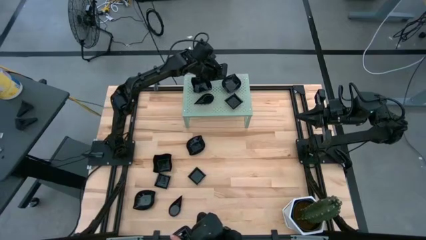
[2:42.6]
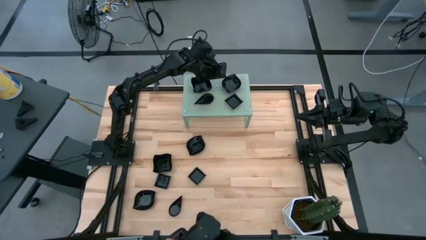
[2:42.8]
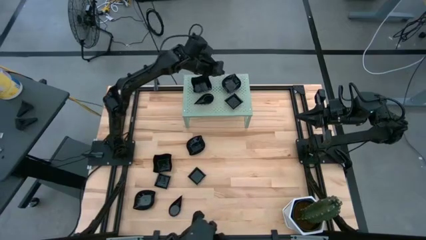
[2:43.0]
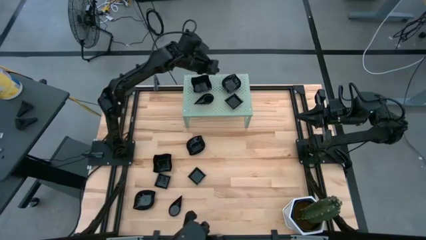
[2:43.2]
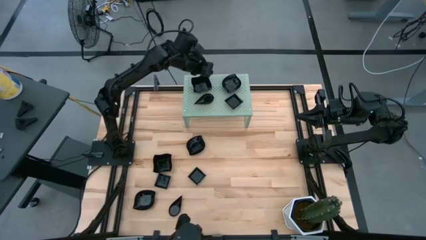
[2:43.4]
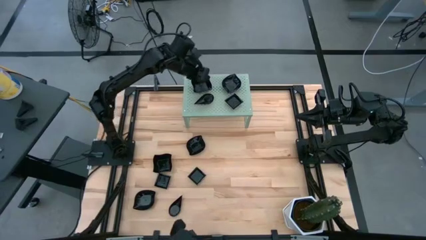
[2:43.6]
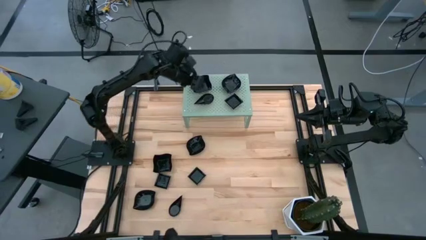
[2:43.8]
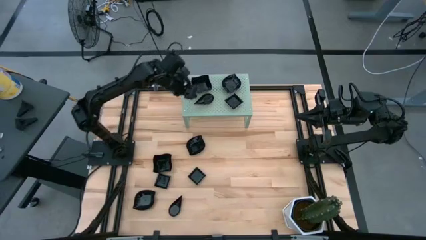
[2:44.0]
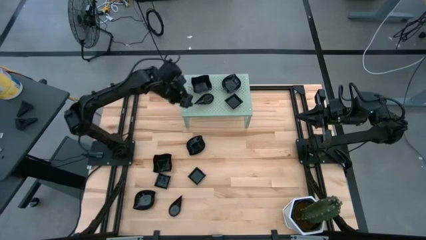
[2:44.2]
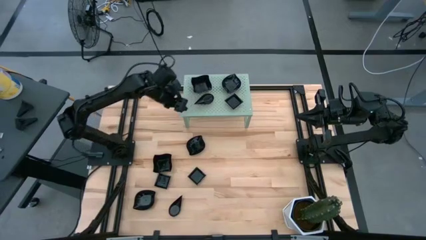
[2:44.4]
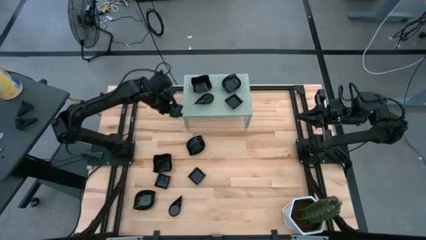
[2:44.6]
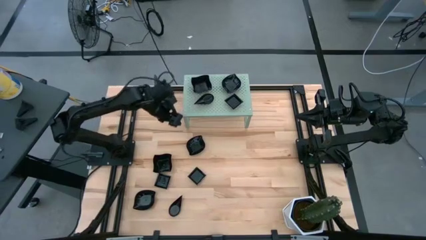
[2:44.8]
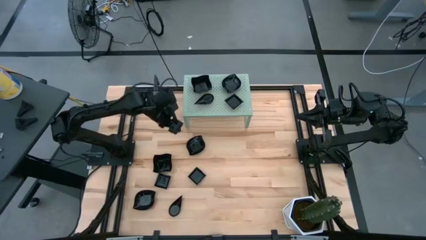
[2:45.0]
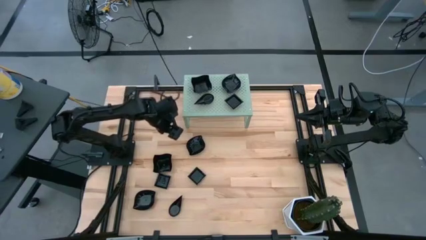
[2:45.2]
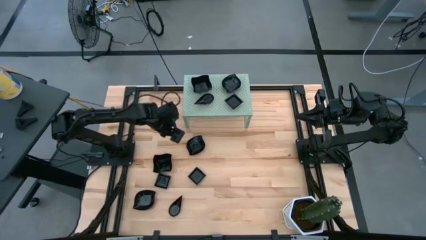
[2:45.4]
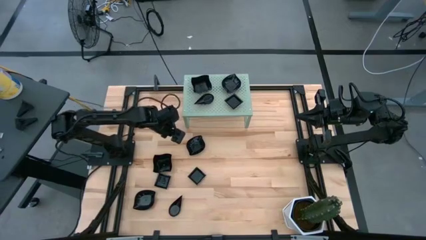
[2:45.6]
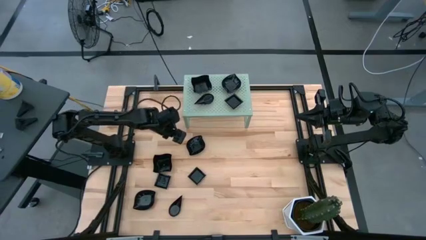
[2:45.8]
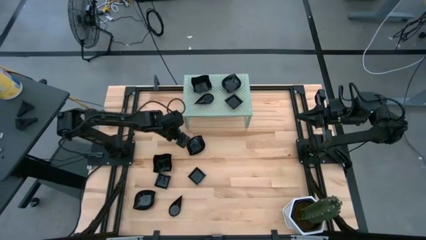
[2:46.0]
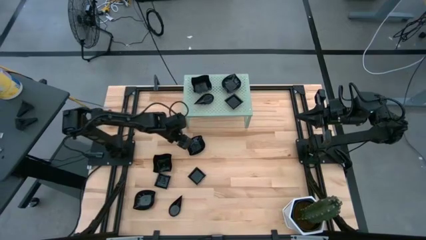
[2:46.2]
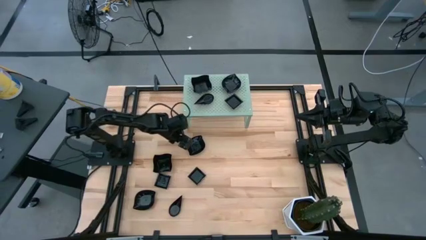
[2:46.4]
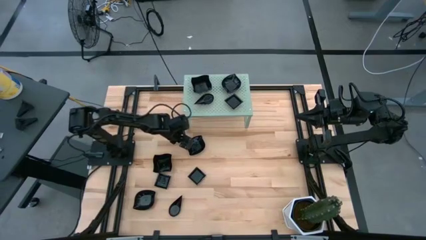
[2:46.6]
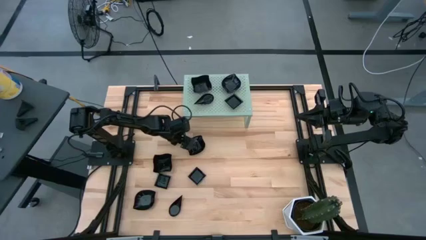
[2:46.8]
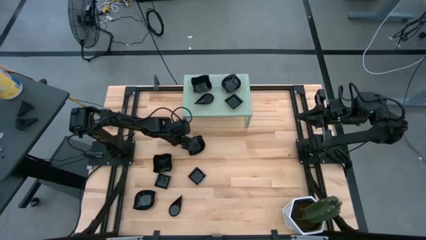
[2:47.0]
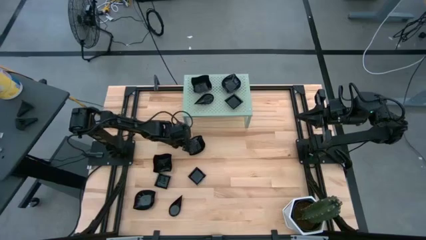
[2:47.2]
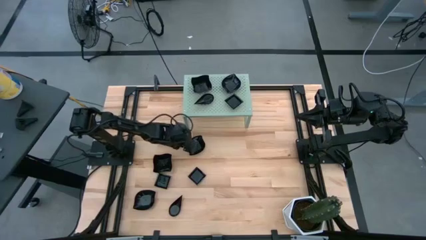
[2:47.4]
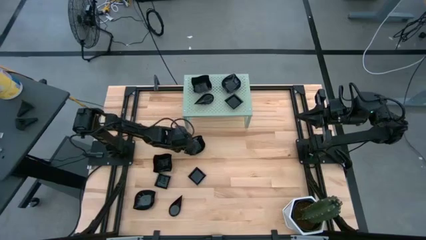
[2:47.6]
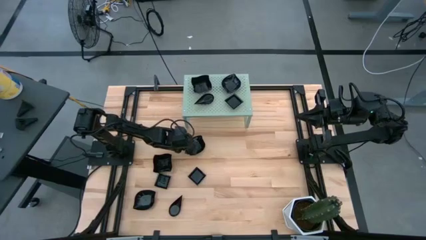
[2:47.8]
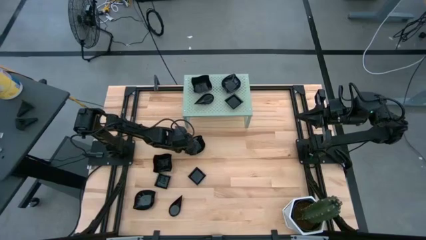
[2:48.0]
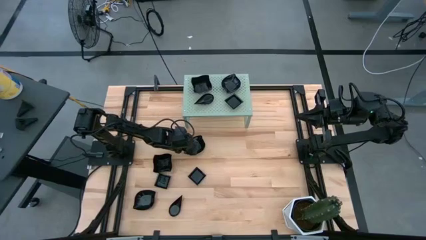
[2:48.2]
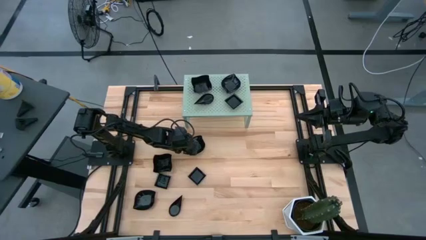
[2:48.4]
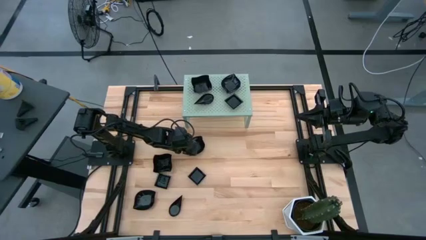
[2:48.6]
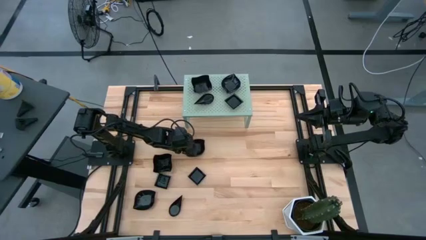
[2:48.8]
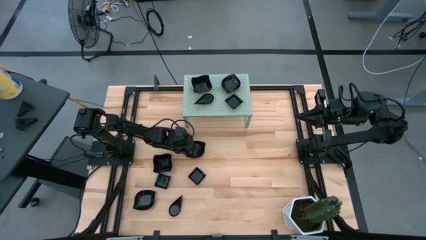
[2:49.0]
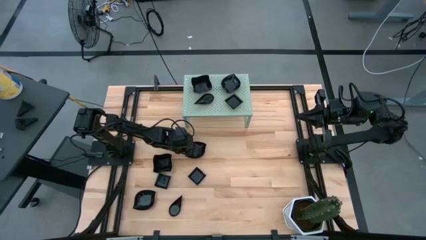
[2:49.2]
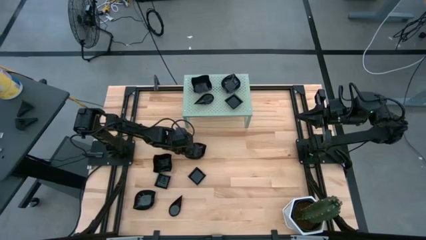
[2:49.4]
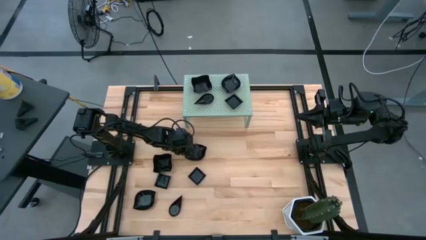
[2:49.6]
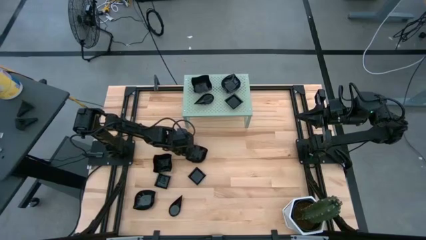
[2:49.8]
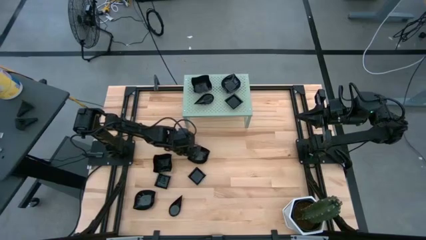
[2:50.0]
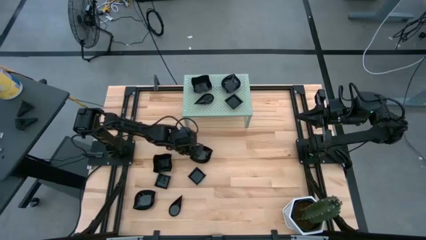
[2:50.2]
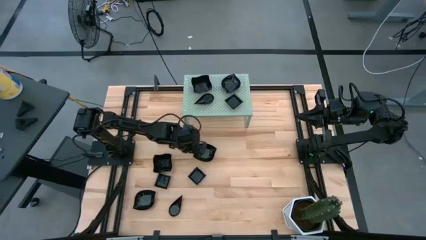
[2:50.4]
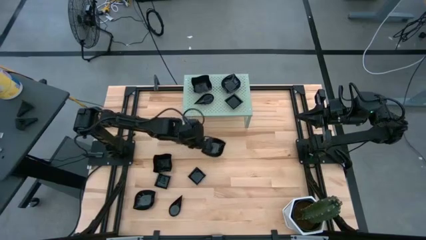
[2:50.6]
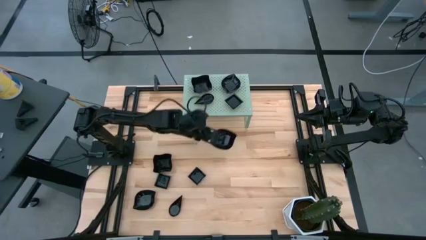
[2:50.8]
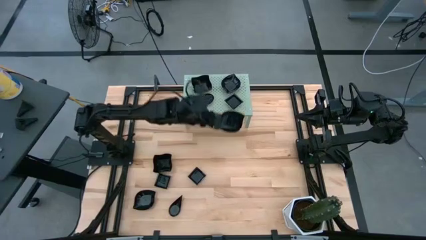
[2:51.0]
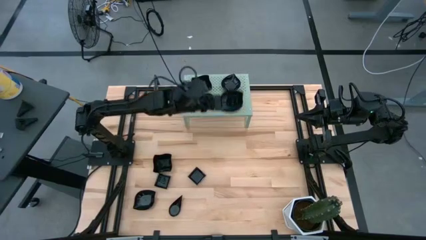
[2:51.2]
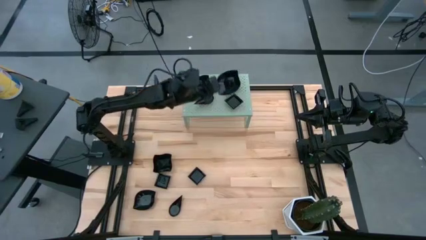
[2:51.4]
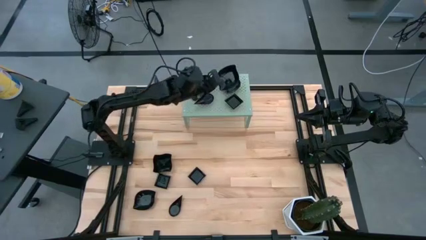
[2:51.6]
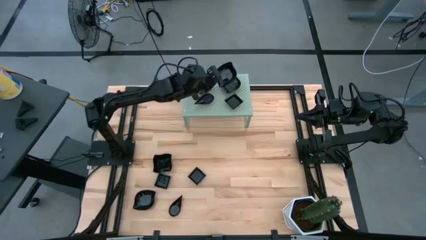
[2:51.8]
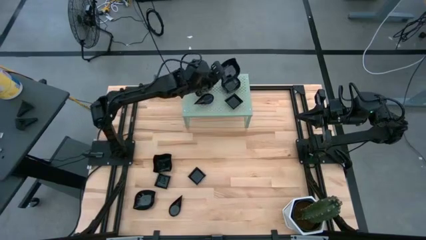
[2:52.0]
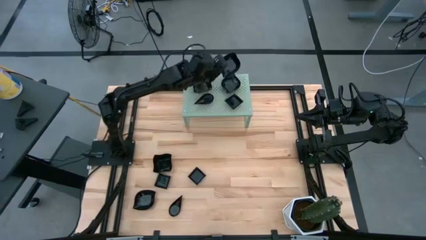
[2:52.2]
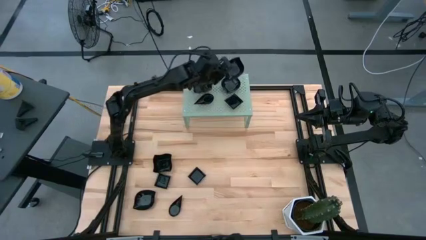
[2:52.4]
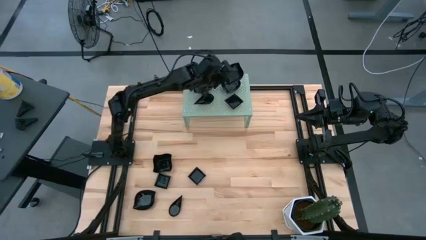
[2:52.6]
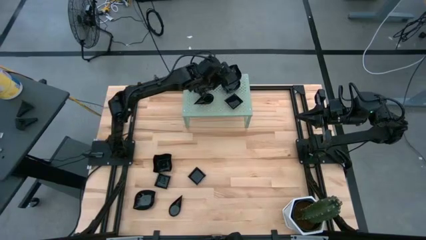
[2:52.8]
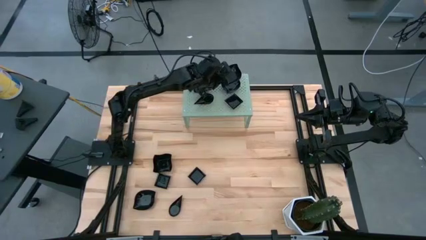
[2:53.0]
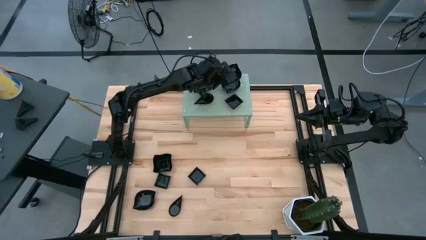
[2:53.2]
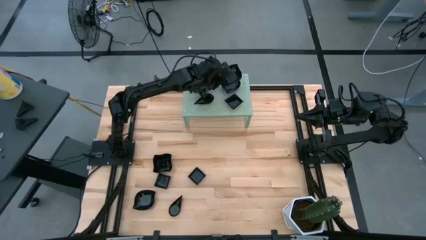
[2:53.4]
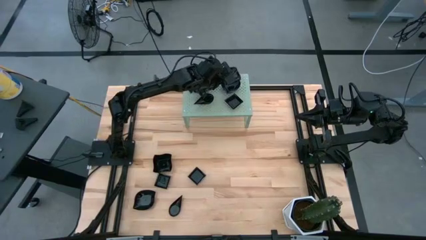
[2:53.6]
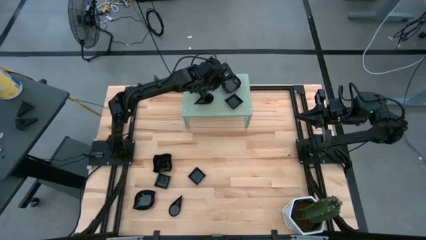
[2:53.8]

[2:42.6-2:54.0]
Task: Pick & Place Mini shaped plates
Stack the leaf shaped plate on top of the leaf shaped plate on the shelf

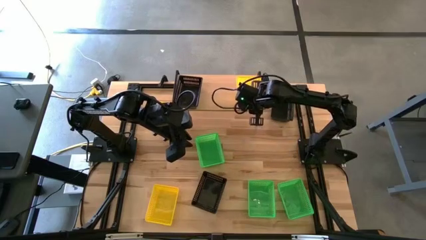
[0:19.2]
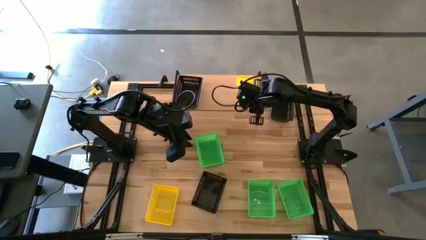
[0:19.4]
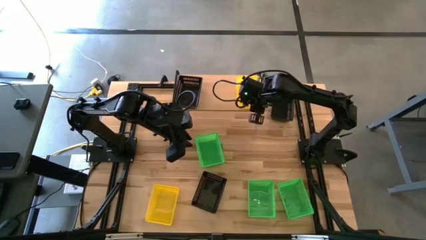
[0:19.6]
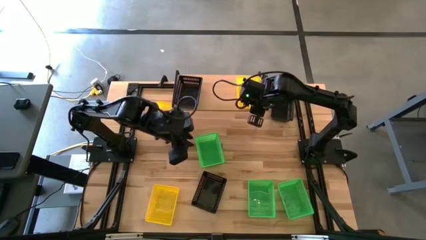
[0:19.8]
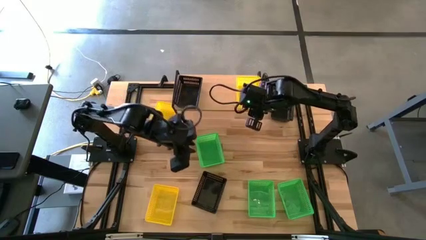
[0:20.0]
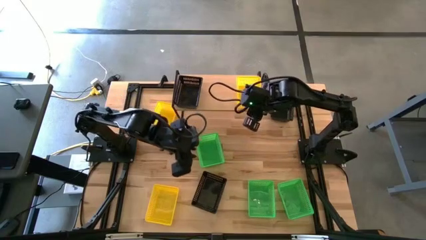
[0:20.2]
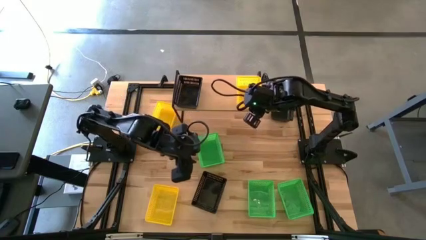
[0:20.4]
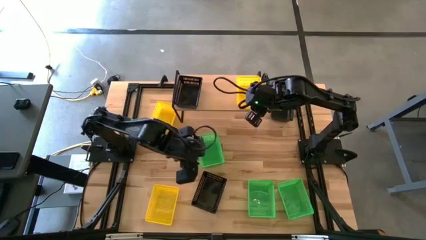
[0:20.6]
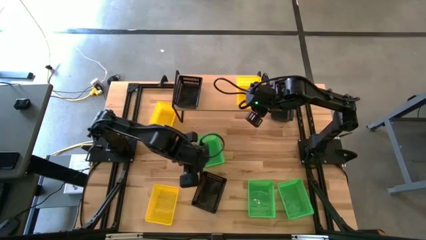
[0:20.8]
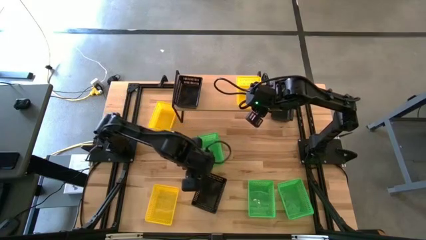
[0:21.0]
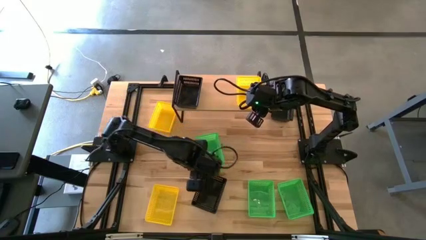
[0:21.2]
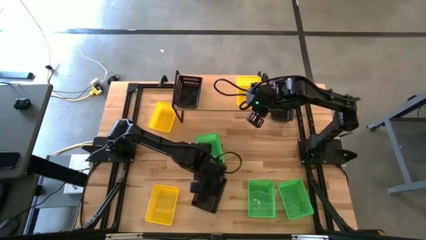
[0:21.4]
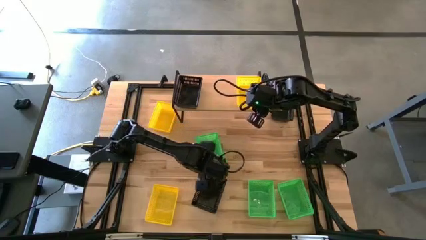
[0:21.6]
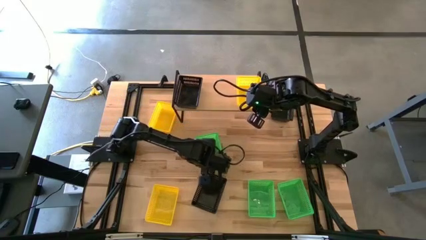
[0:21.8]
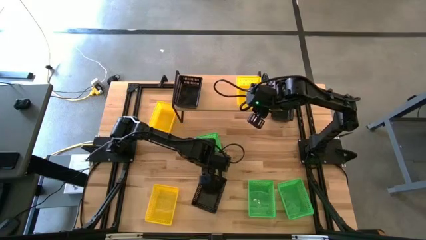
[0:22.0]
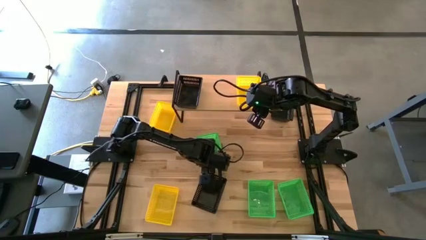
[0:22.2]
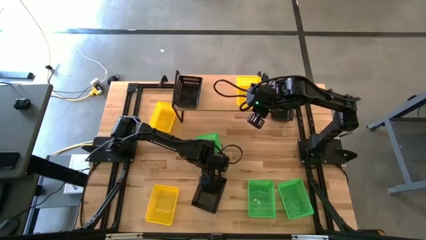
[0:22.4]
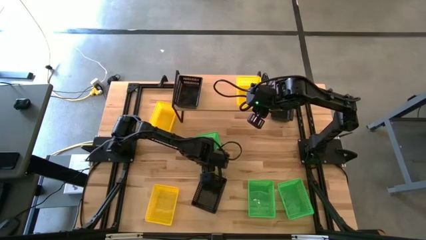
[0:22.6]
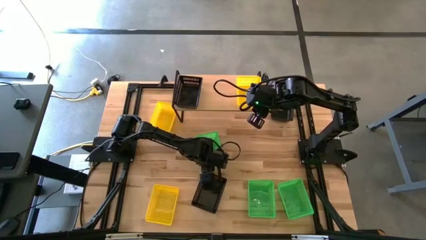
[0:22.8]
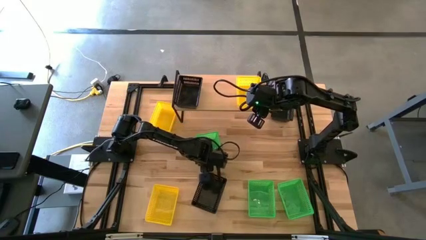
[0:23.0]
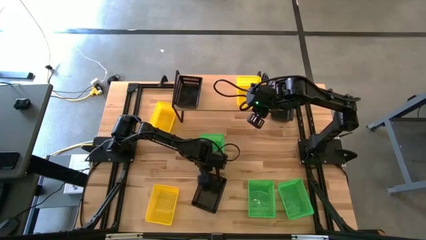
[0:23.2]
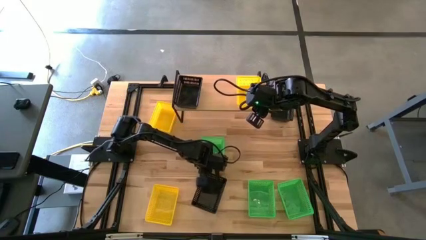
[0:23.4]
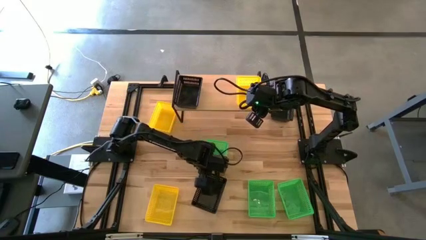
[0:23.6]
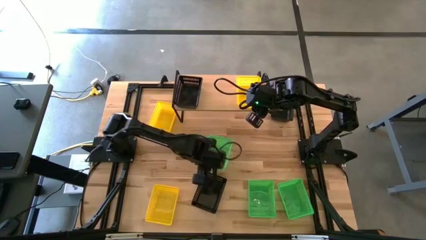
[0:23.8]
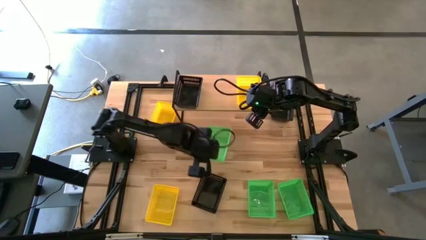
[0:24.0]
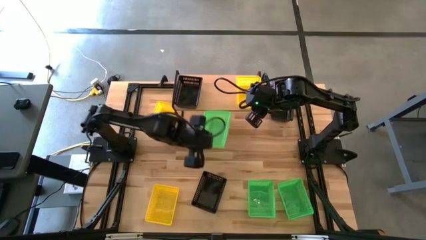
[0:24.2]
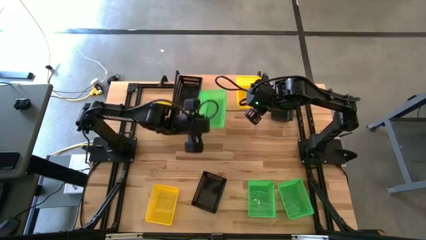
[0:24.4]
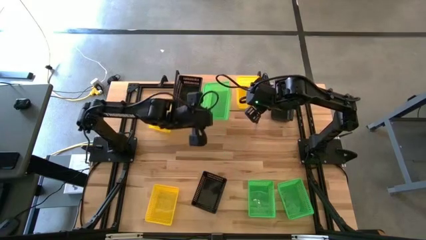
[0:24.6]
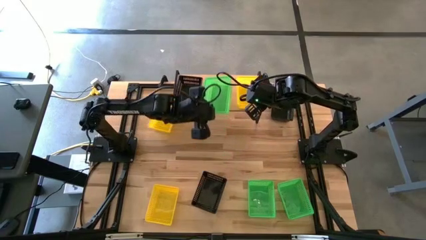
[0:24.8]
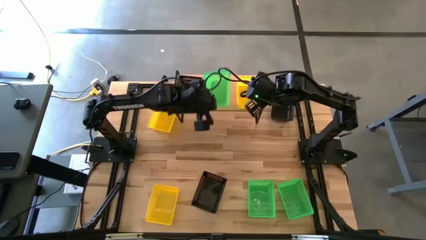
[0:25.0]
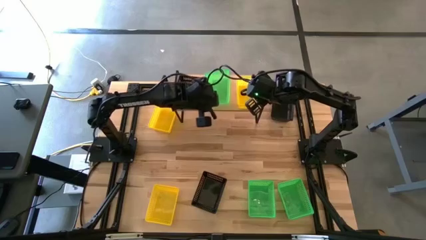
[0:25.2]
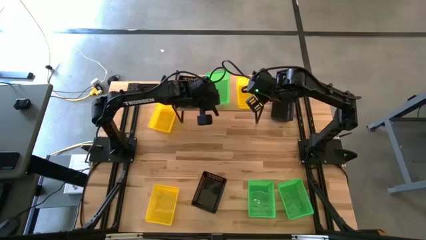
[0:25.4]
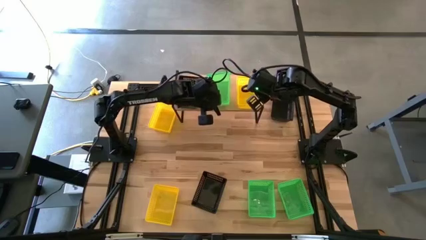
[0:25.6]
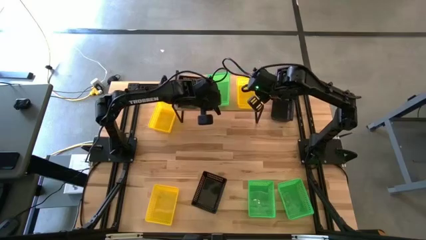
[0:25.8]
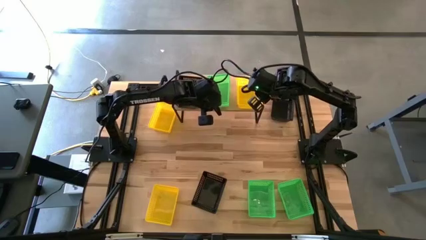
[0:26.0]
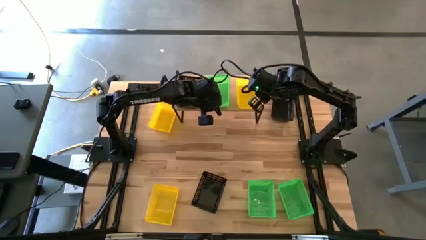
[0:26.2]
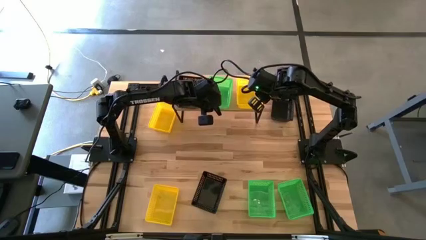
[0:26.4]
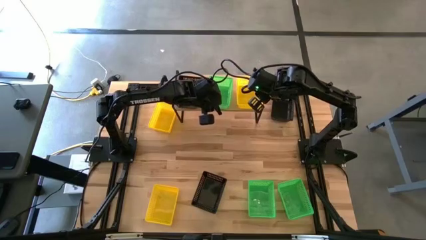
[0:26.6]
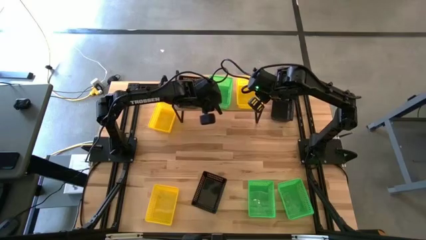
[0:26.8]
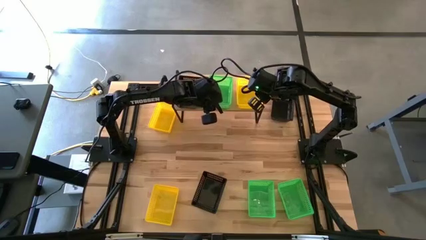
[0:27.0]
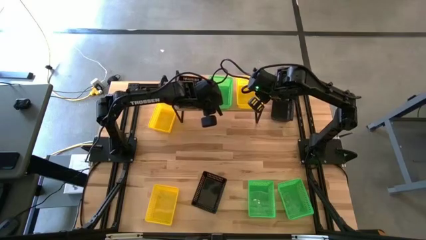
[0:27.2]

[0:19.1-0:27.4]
Task: Stack baskets on shelf by color
Put the top green bin on the shelf
